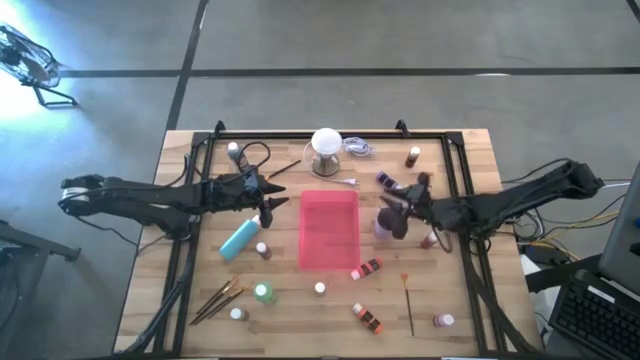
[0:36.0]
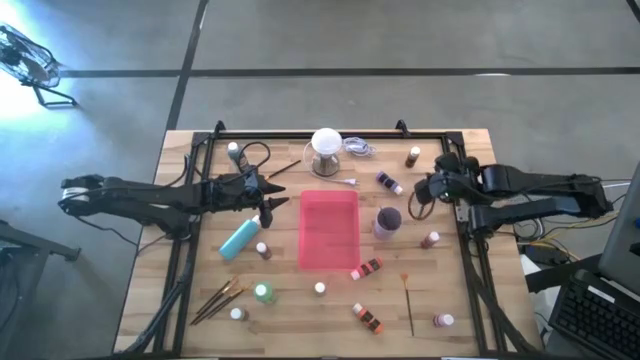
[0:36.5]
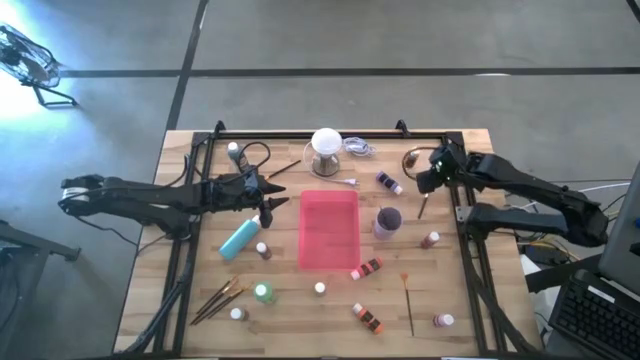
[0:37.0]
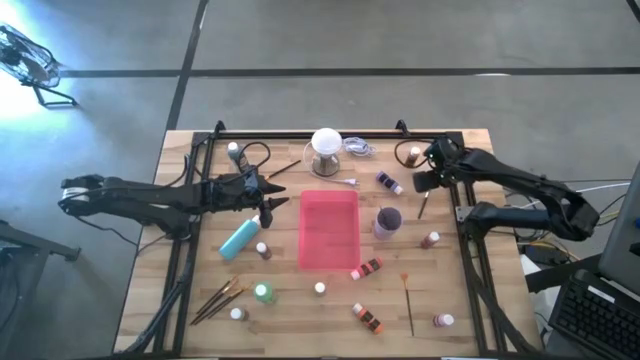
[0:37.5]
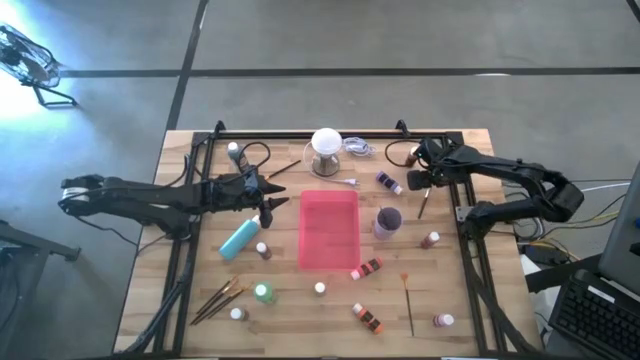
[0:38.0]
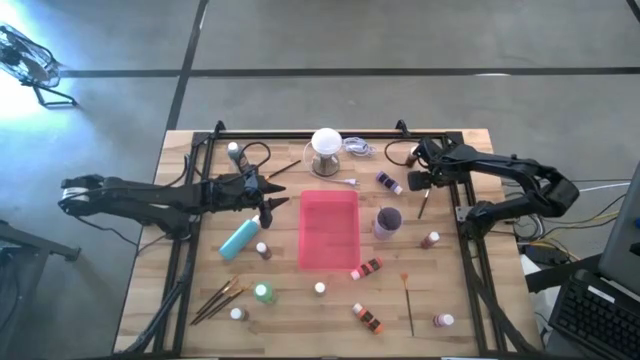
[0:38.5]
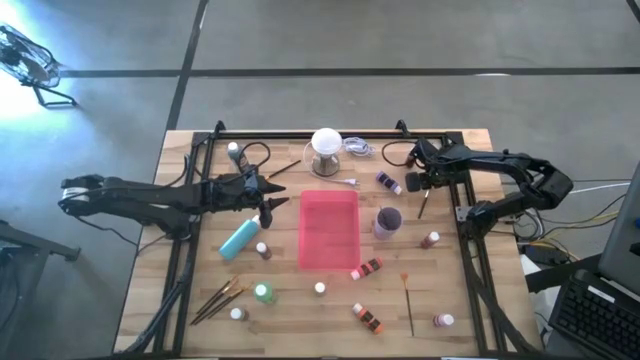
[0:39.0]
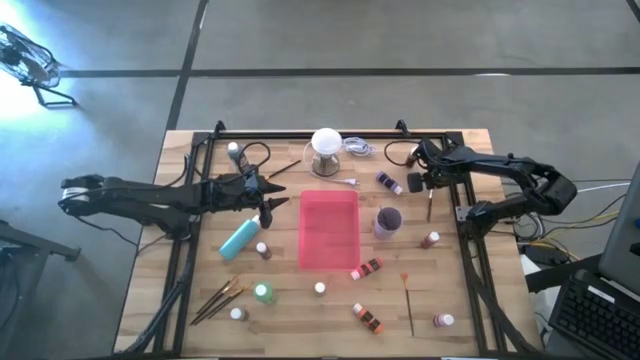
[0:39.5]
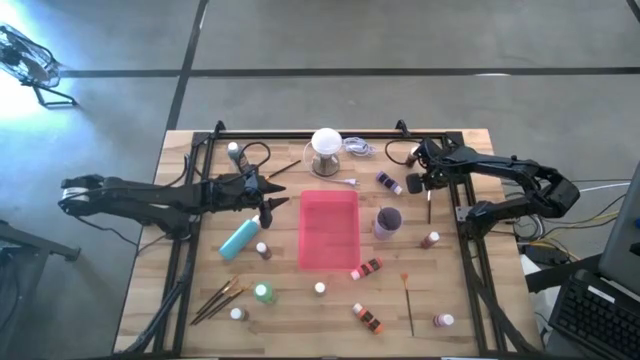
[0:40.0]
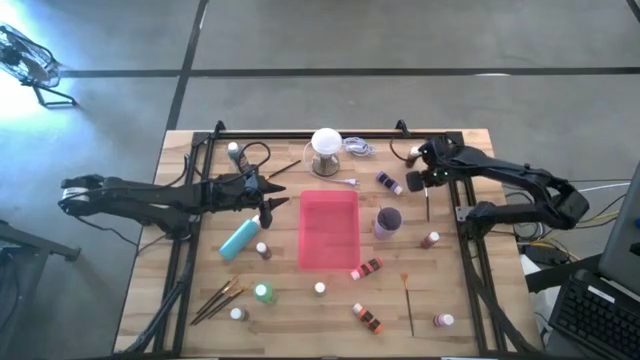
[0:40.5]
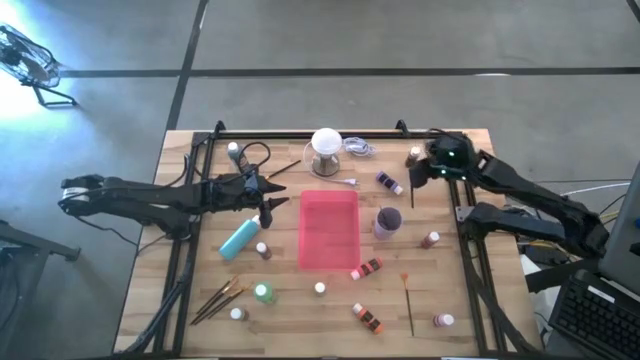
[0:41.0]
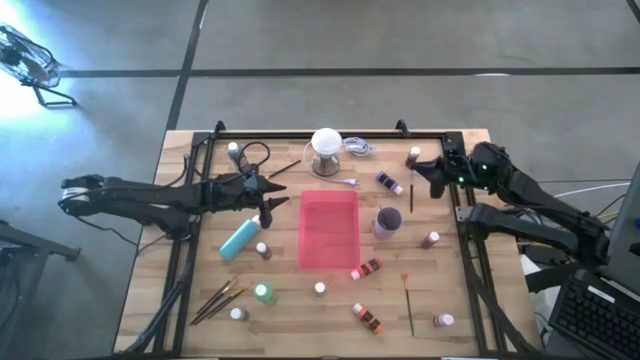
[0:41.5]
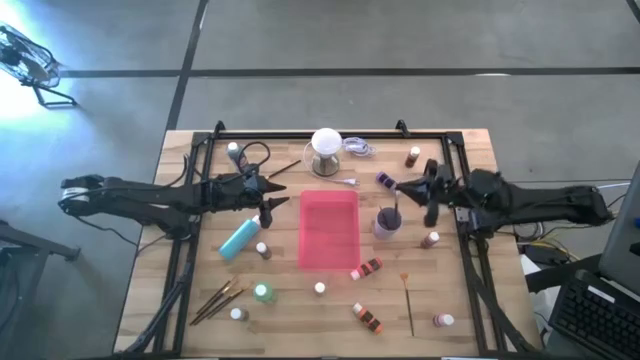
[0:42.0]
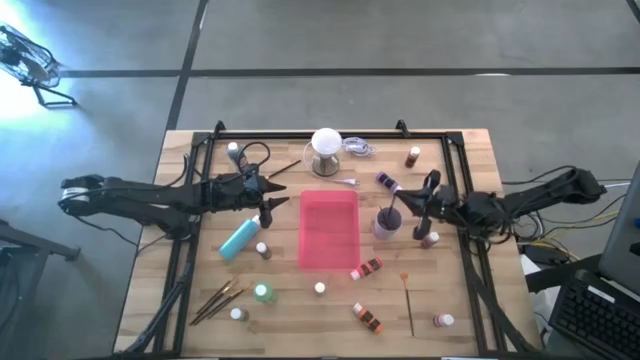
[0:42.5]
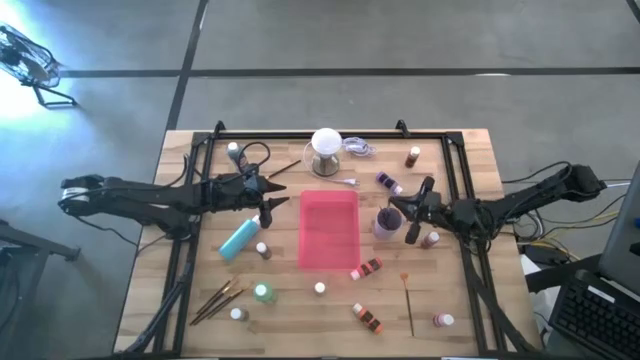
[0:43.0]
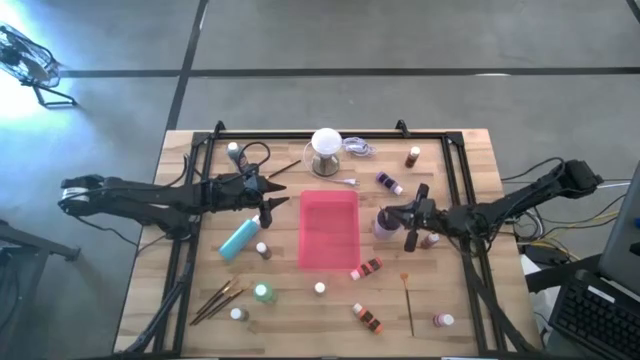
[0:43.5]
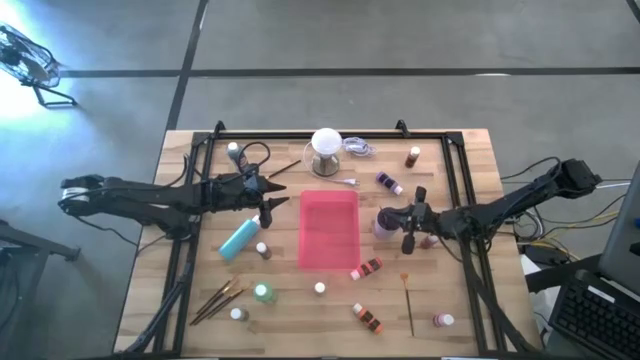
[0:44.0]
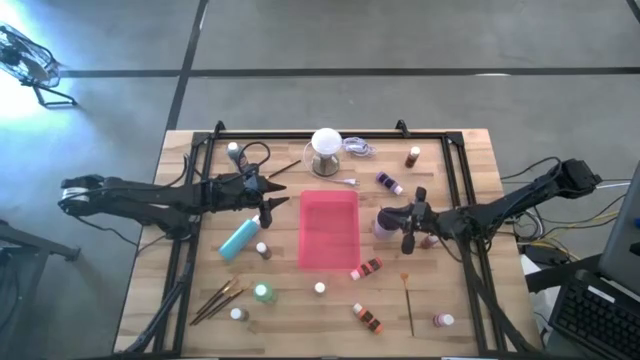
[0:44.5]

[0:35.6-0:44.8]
Task: Pick & Place Paint Supplies
Put the silver paintbrush into the purple cup

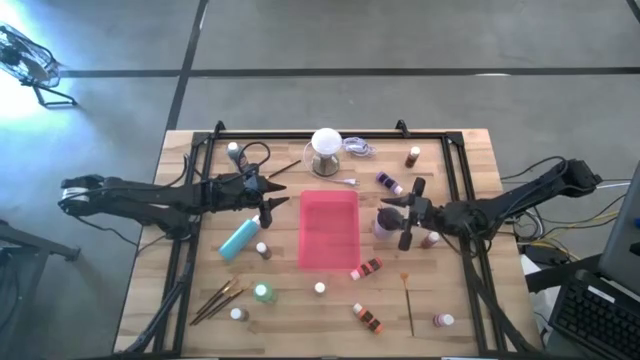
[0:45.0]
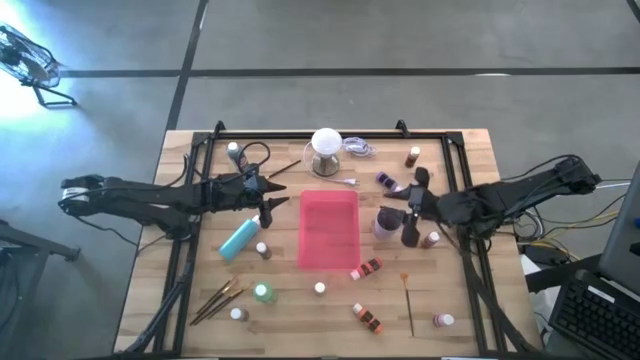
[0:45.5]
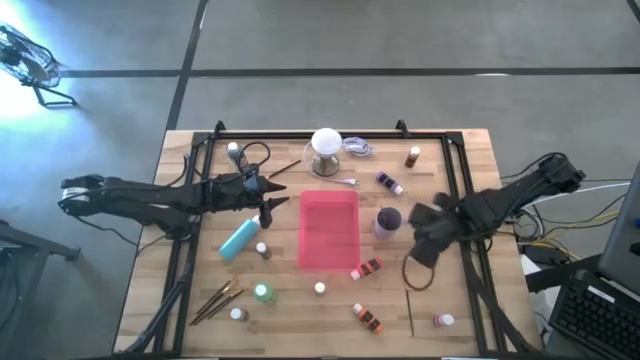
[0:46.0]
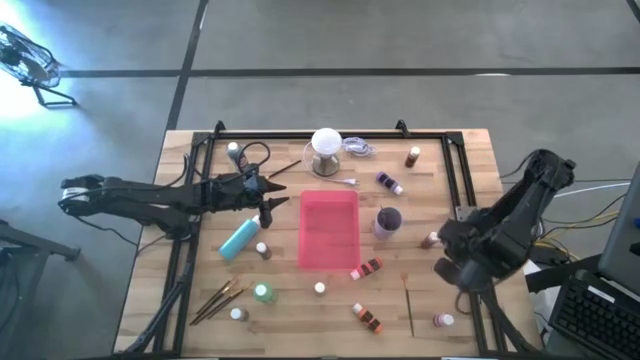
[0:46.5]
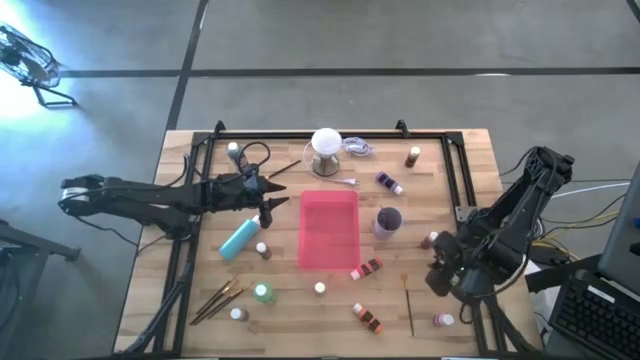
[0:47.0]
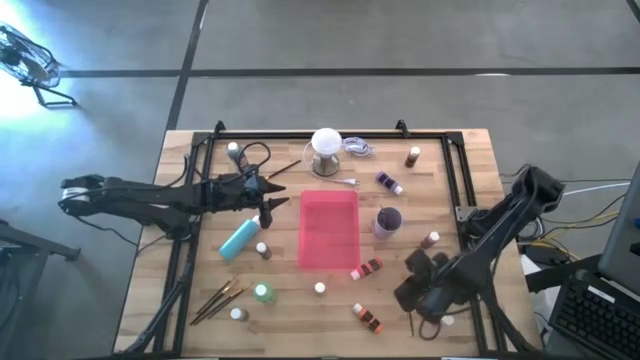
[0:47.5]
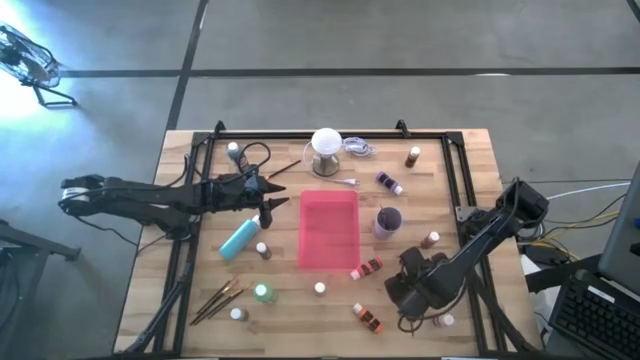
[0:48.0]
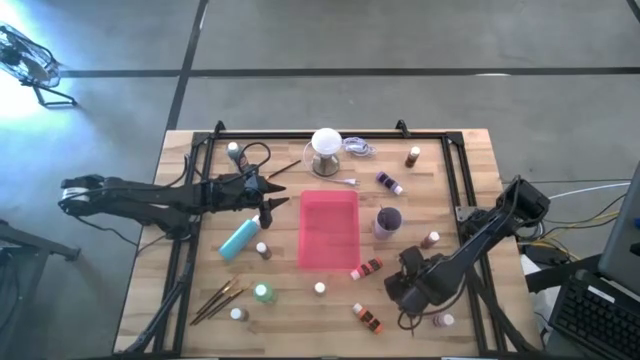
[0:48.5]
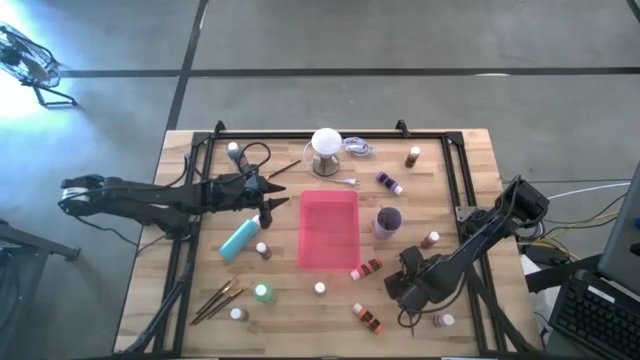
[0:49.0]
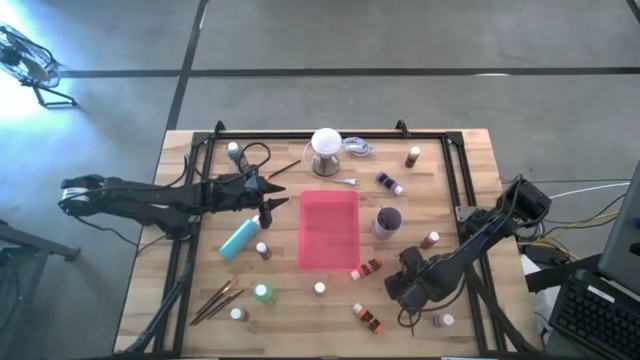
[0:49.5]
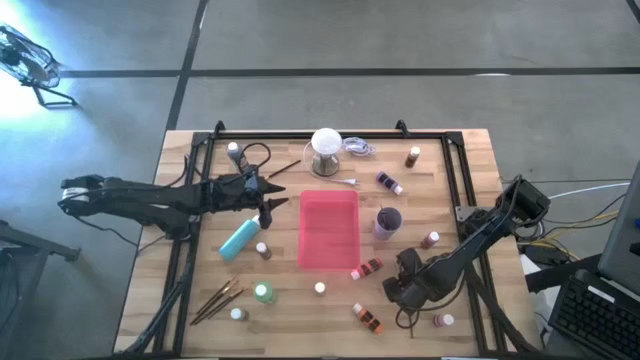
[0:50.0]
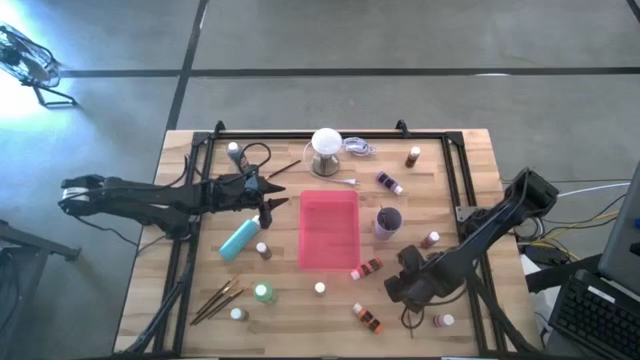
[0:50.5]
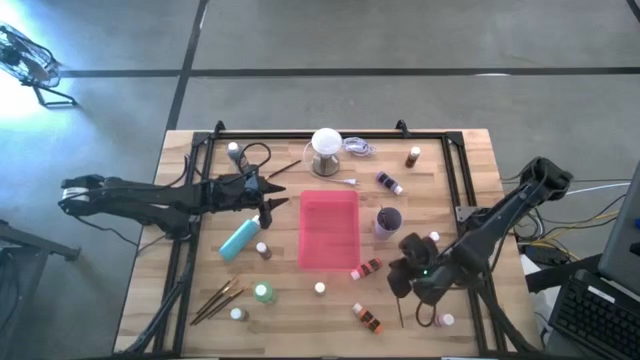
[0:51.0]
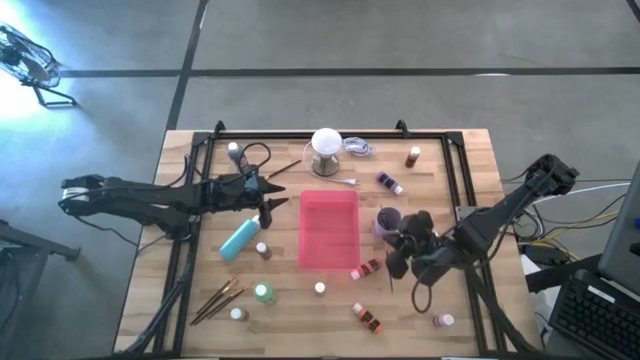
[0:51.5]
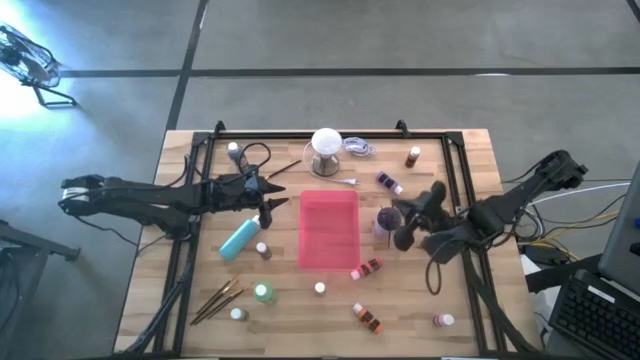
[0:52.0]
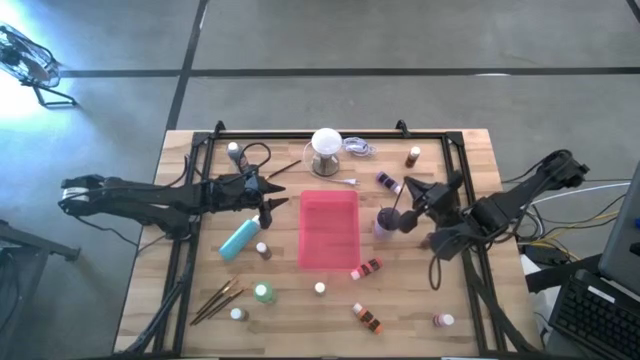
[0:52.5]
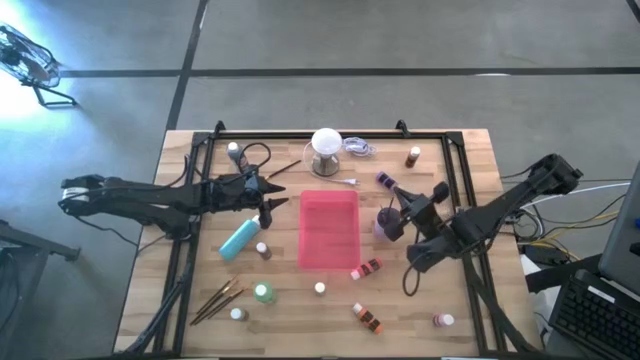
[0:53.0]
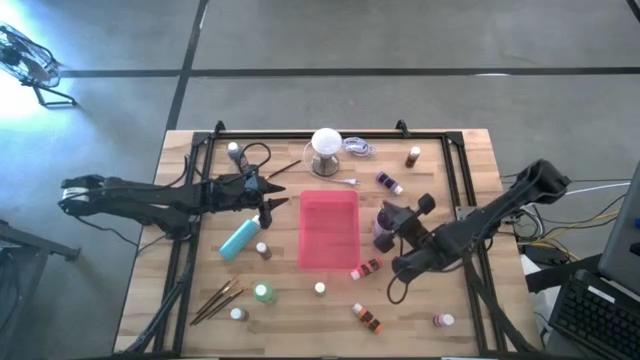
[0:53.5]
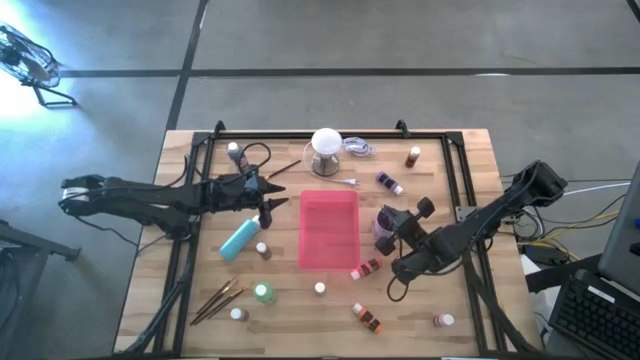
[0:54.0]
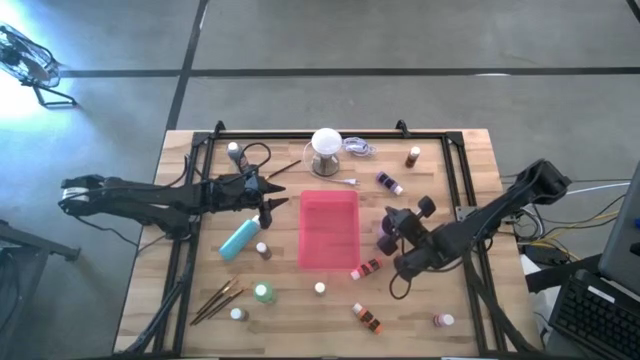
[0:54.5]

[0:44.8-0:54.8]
Put the orange paintbrush into the purple cup
